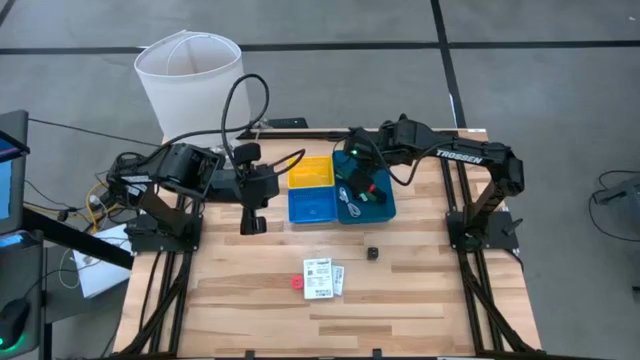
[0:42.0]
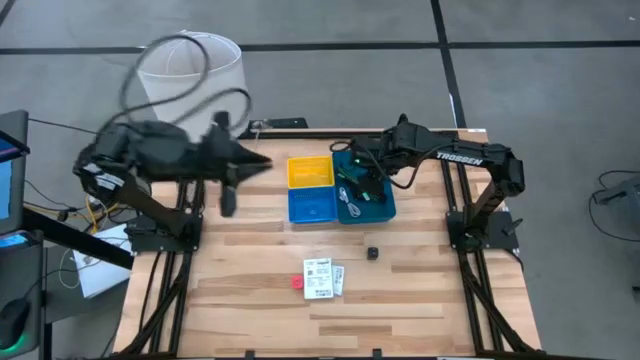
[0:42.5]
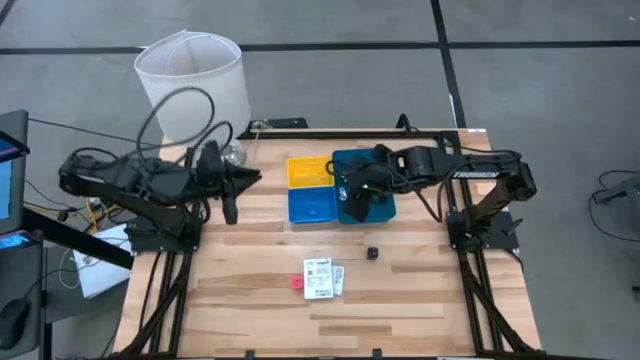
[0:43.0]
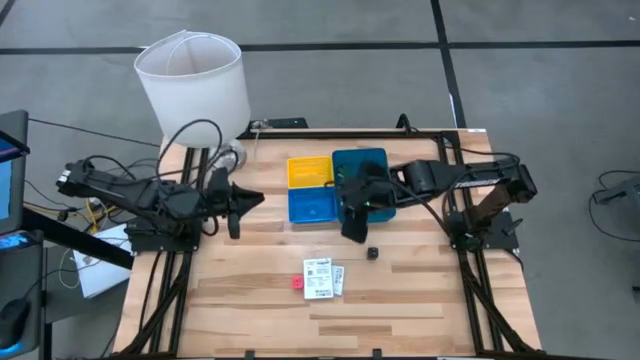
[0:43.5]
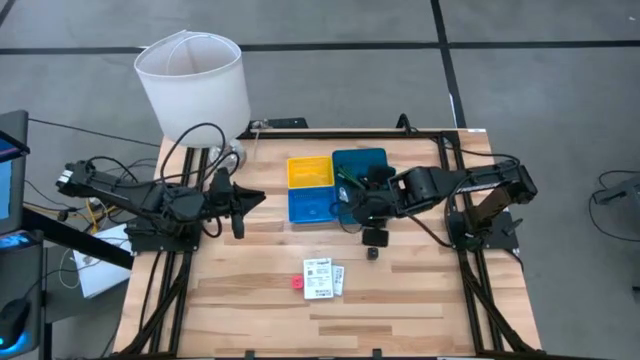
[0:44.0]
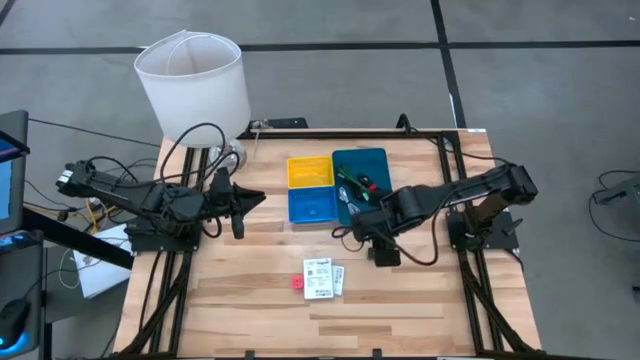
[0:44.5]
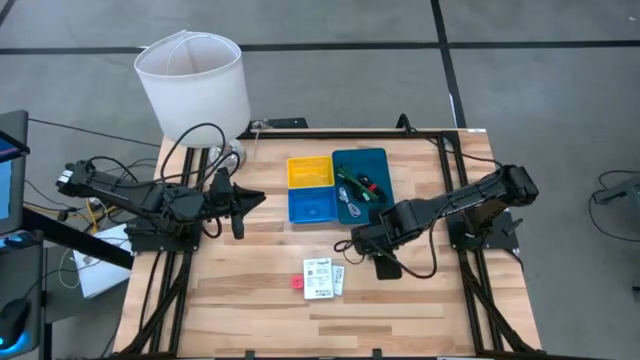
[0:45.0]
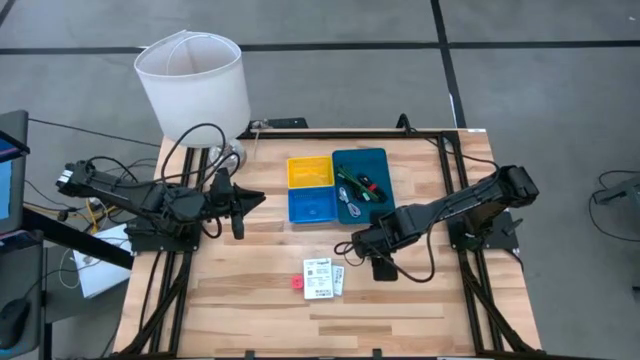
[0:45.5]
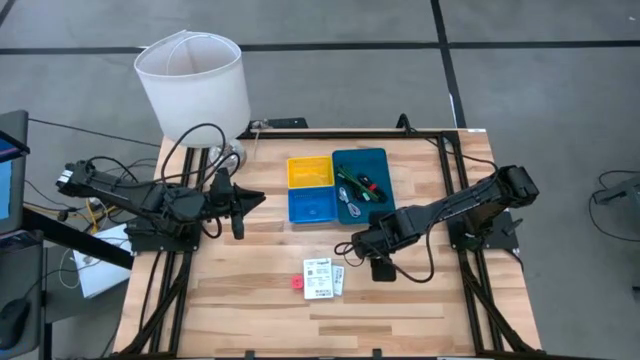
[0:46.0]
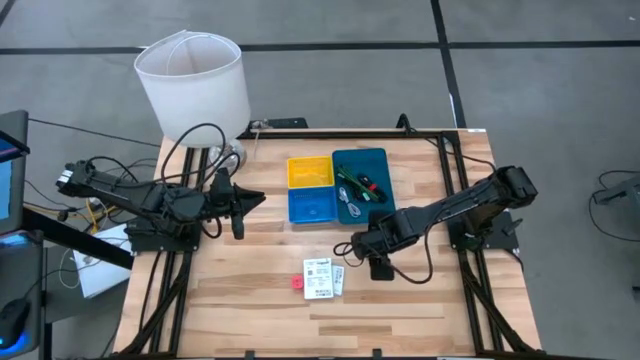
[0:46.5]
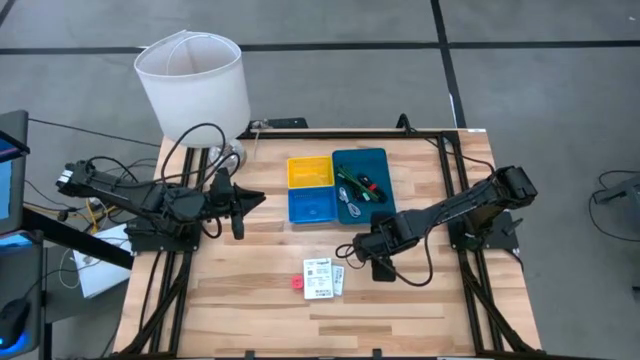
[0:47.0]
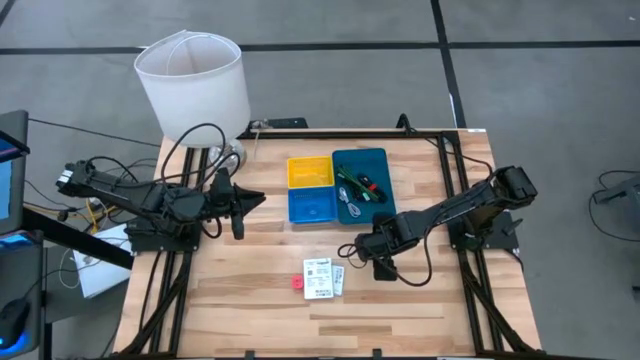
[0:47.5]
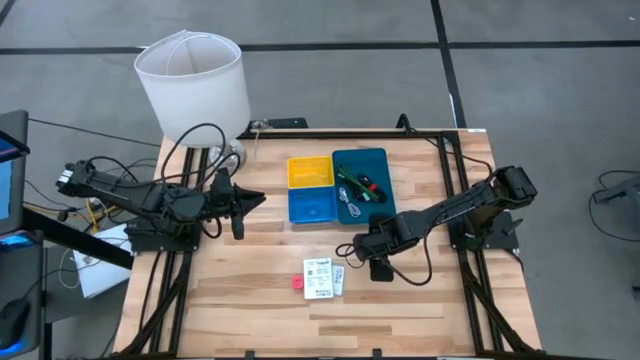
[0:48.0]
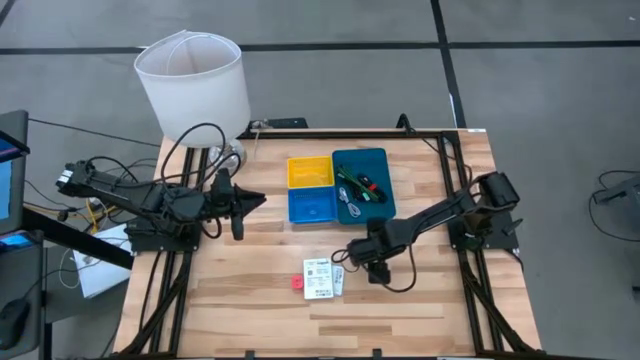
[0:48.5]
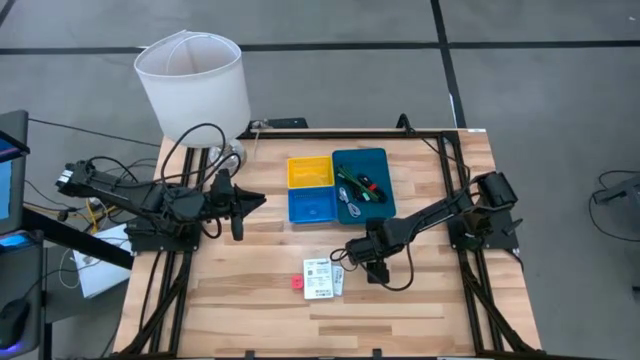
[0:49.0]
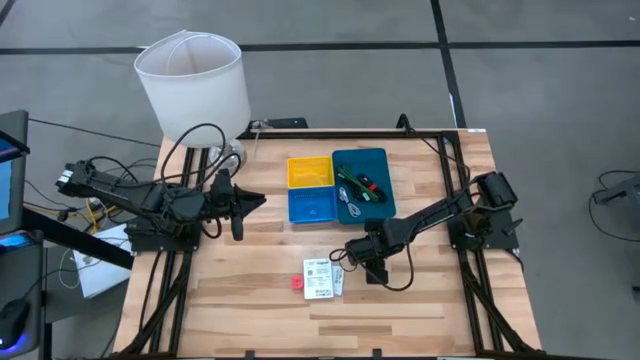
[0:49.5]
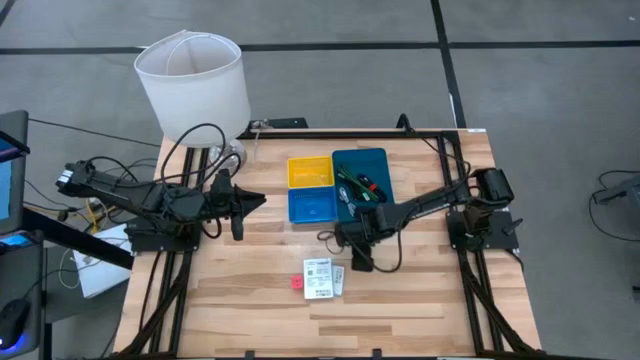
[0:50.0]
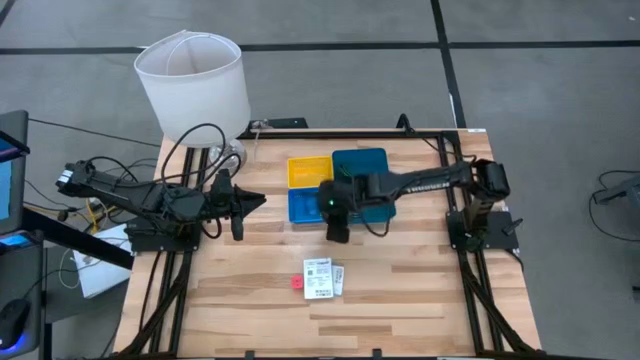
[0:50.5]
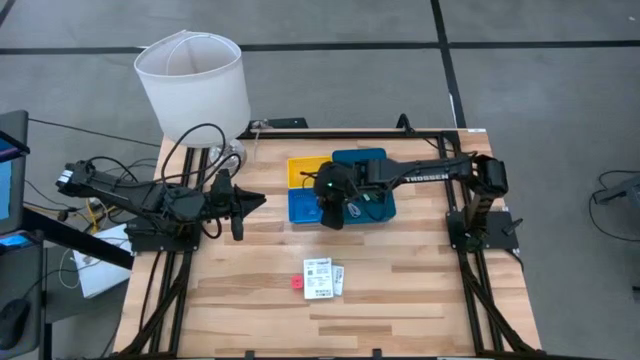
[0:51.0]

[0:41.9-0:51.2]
Task: Pick and place items into bin
Put the black charger adapter in the blue bin

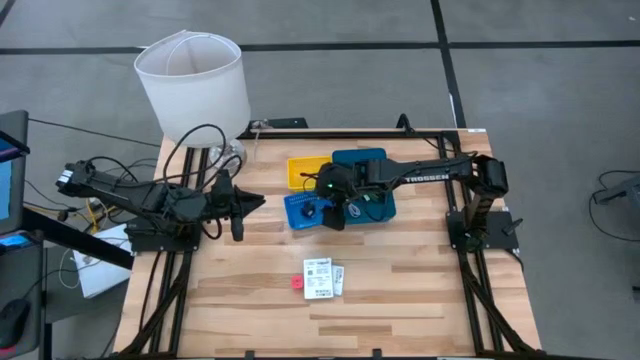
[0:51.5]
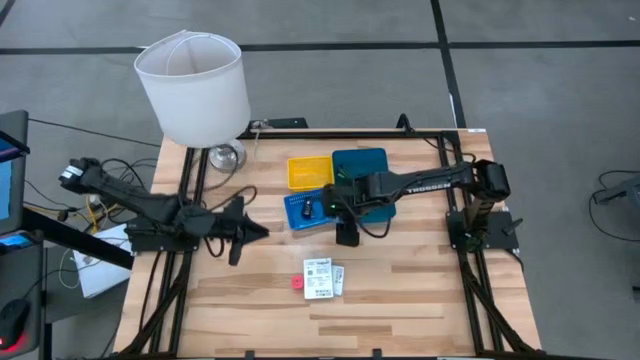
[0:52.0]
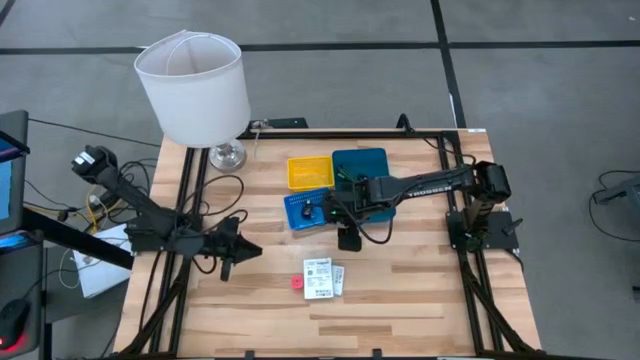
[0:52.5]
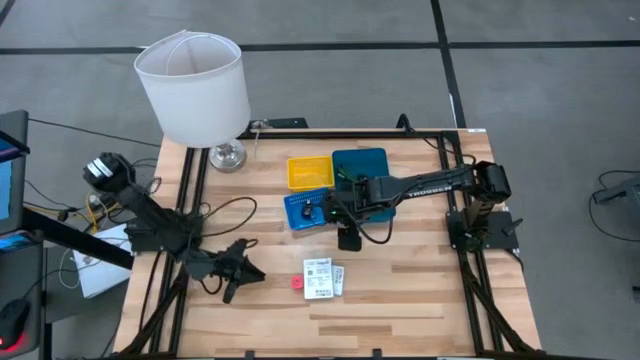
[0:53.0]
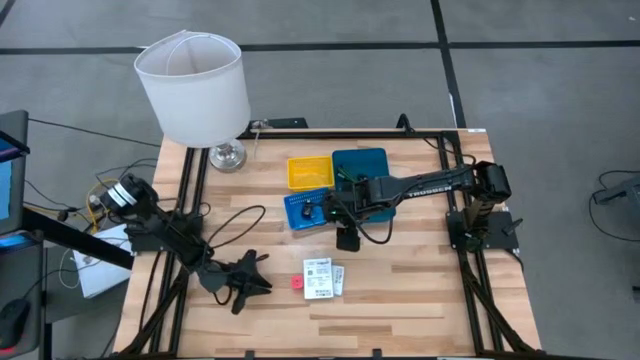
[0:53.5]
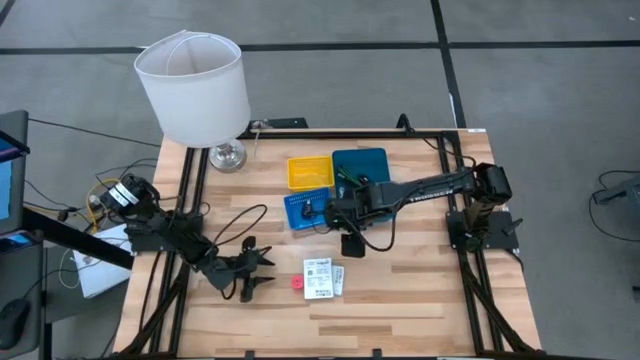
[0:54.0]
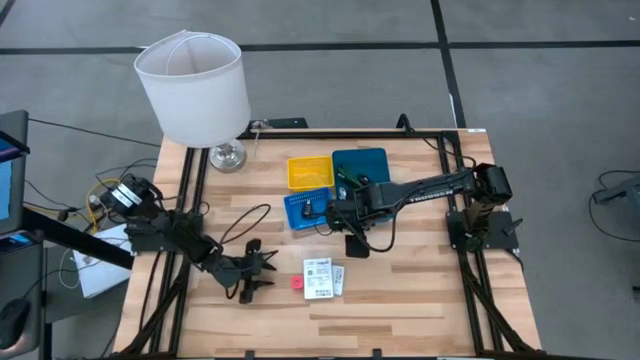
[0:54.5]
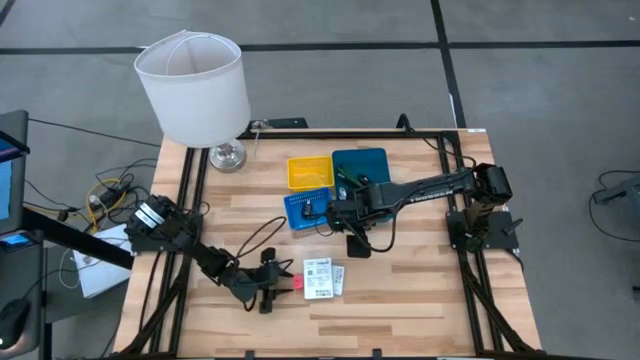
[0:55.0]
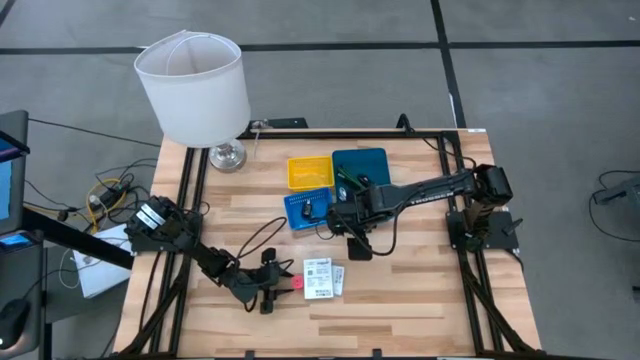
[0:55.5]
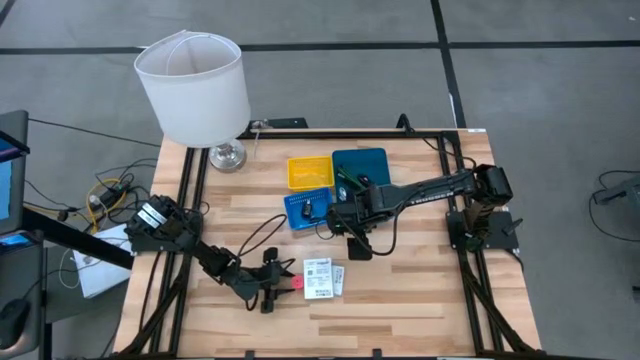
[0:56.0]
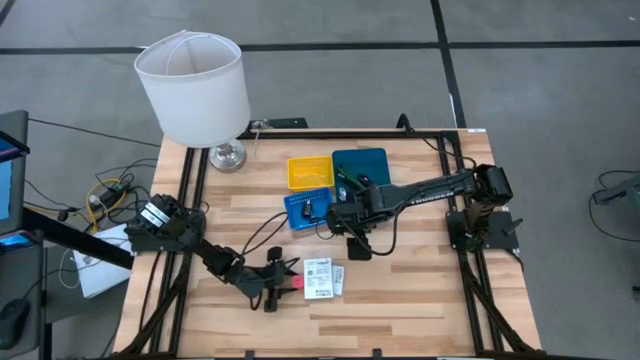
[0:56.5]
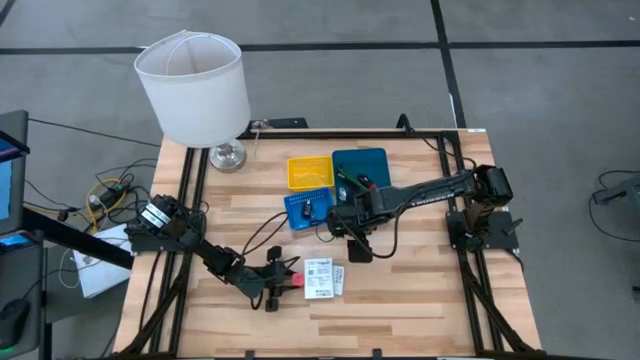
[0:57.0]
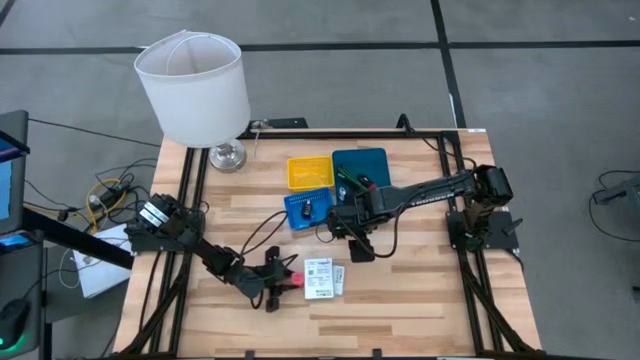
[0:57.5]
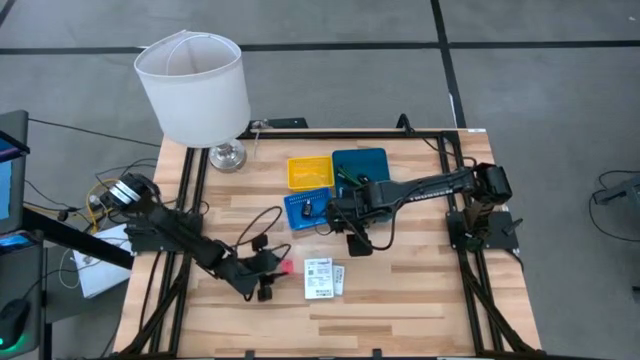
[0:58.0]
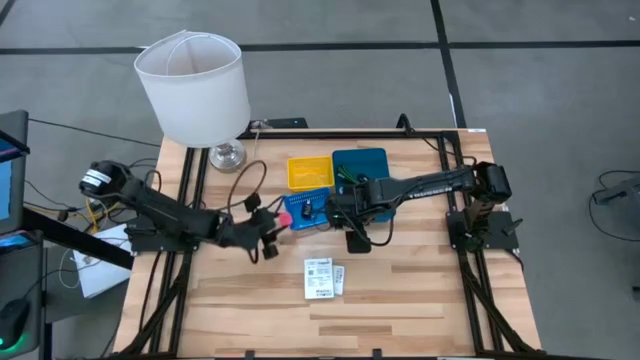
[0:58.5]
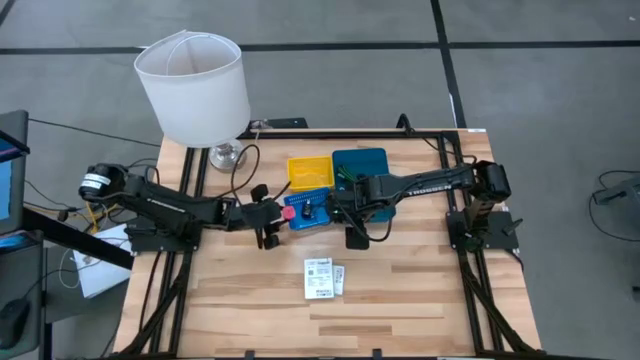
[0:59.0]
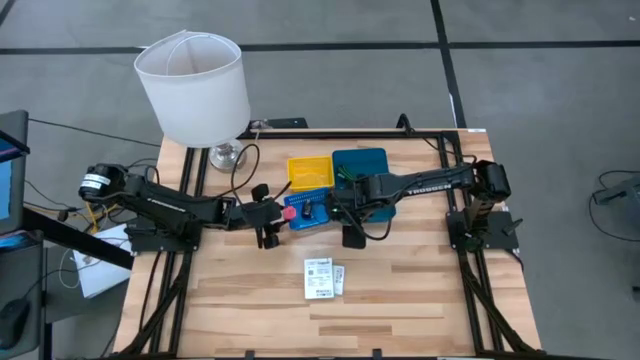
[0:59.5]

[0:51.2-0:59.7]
Put the pink charger adapter in the blue bin

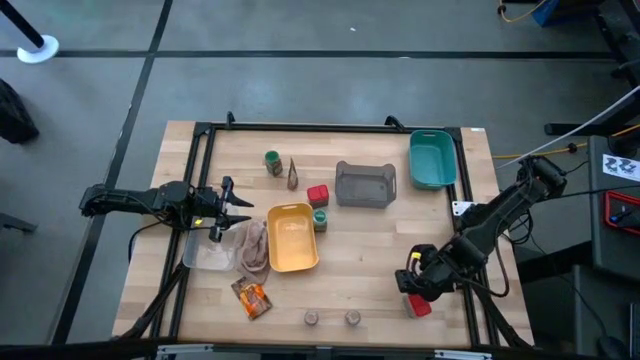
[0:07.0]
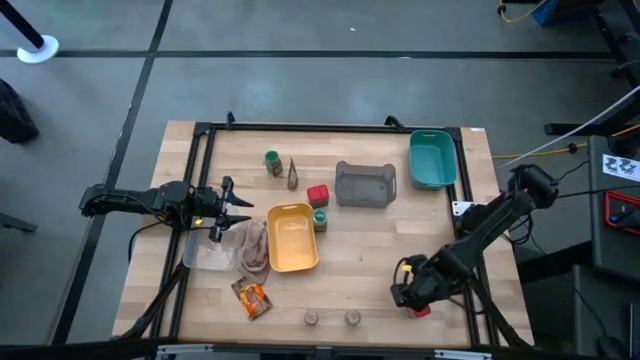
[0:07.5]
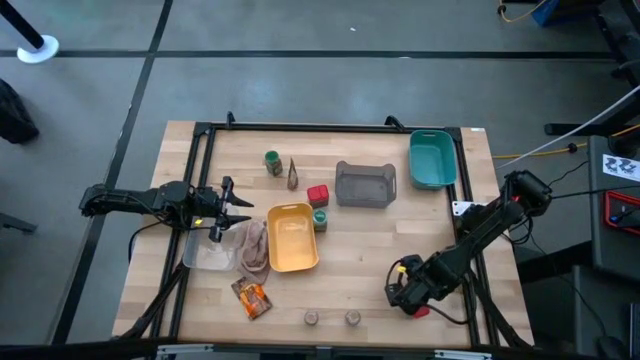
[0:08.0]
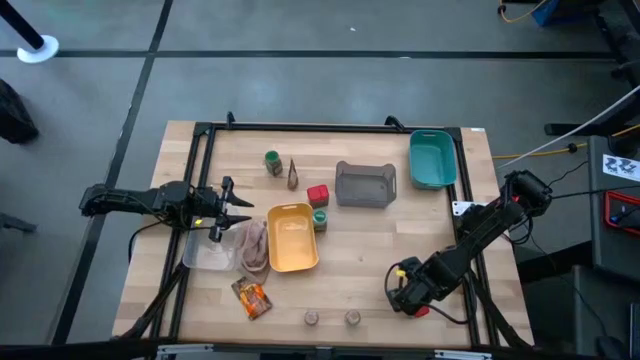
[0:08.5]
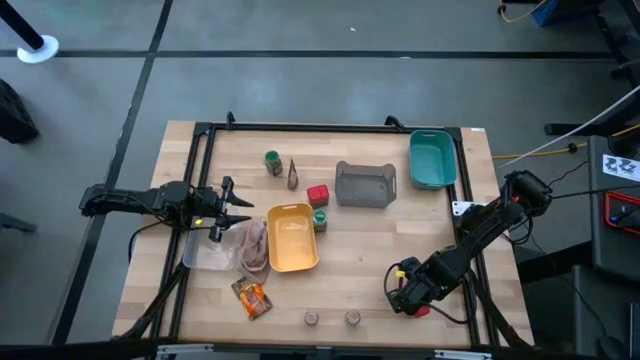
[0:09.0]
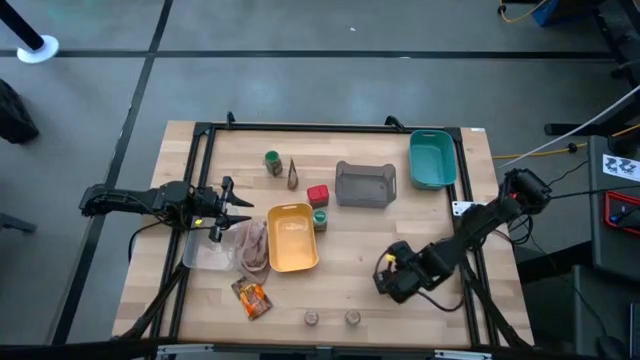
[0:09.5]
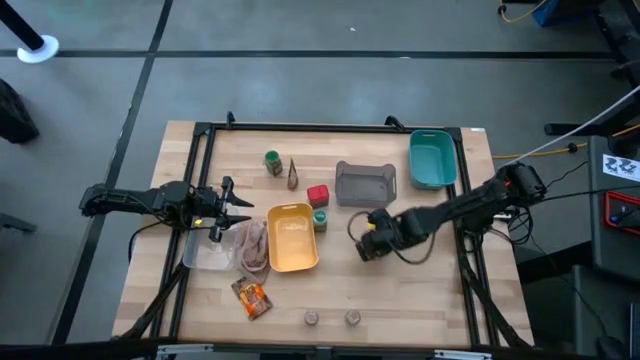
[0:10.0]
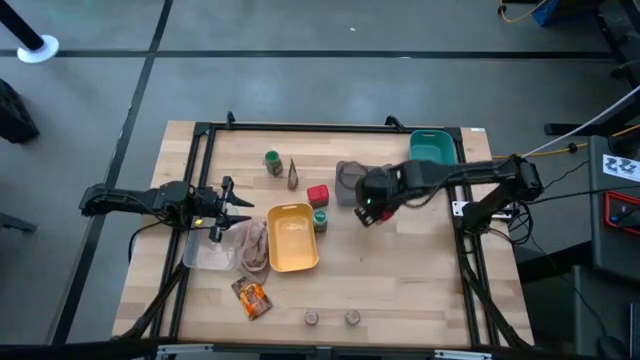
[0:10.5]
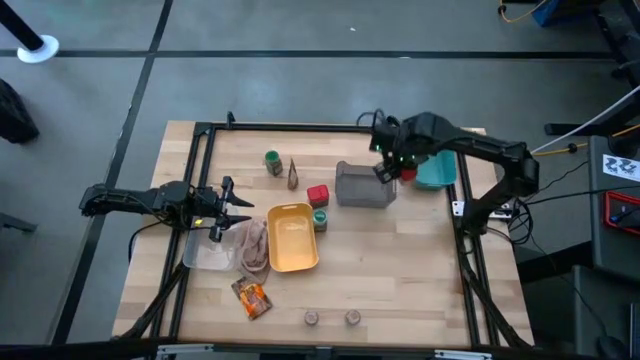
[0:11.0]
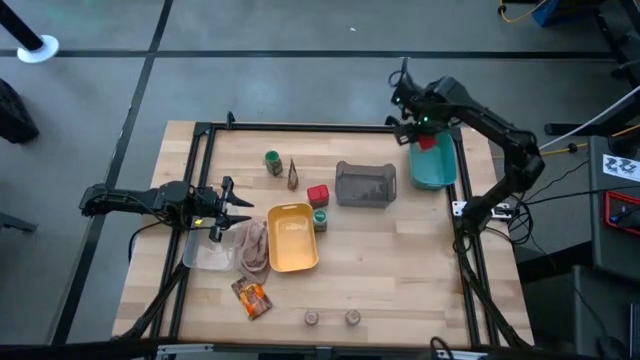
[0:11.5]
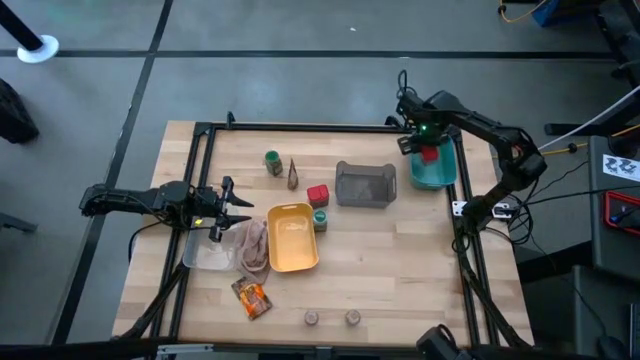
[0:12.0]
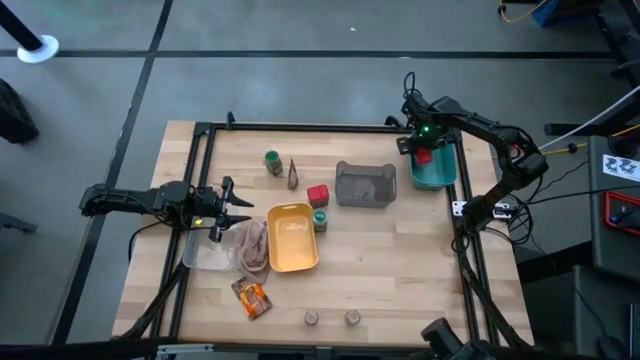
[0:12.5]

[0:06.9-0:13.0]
Task: Sort spices by type
Put the bottom red seasoning can into the green bin
